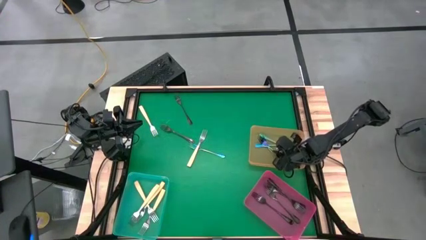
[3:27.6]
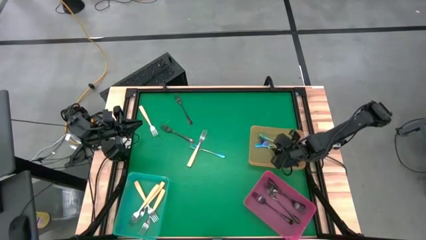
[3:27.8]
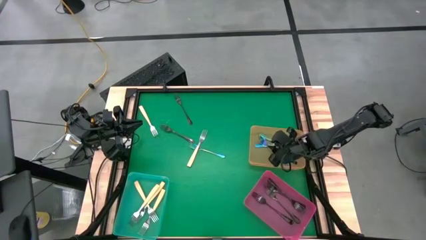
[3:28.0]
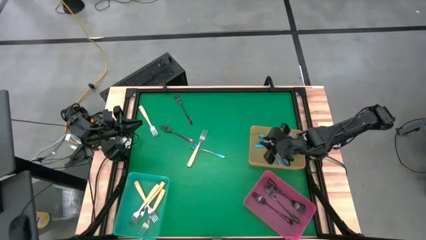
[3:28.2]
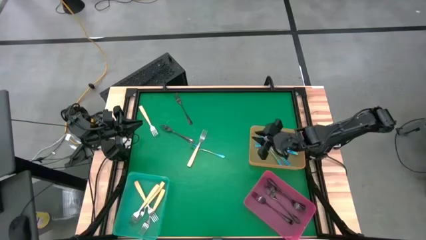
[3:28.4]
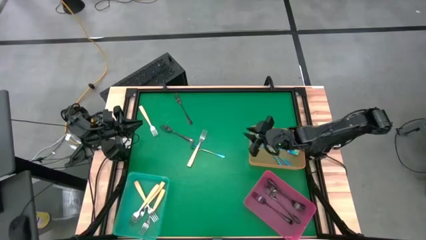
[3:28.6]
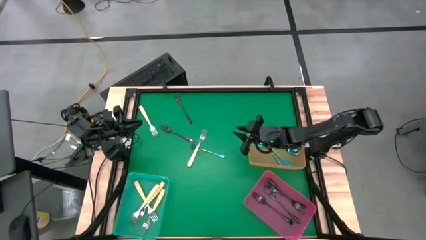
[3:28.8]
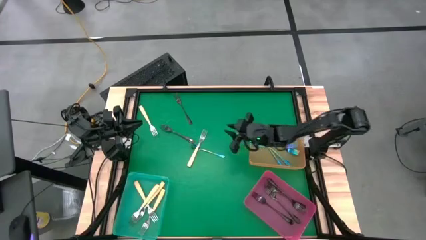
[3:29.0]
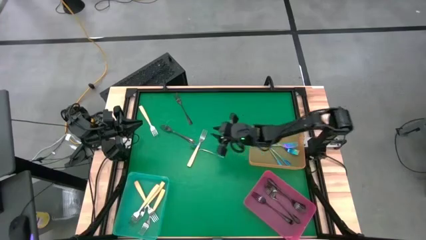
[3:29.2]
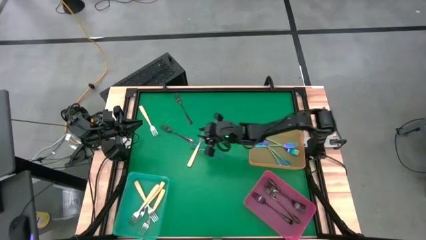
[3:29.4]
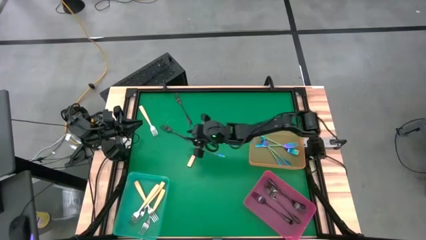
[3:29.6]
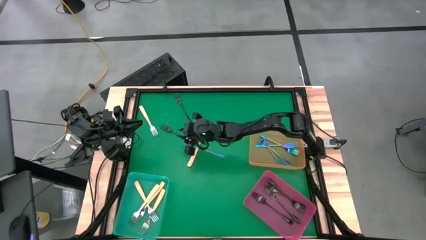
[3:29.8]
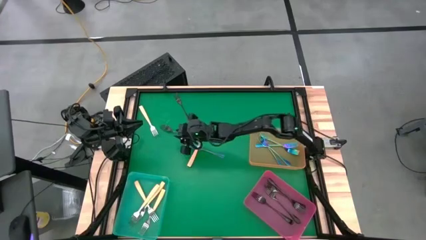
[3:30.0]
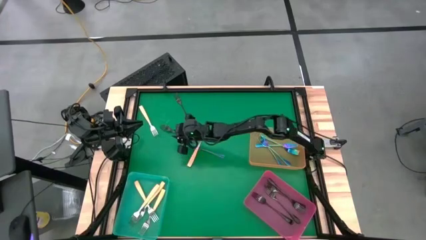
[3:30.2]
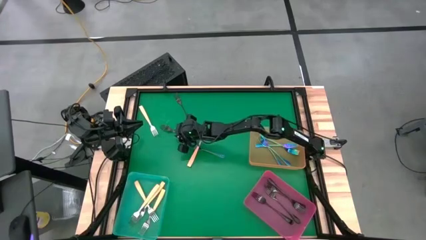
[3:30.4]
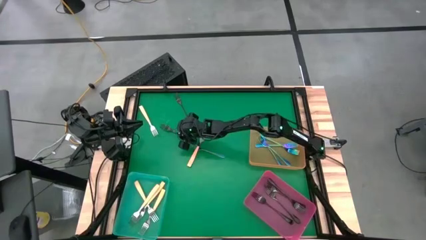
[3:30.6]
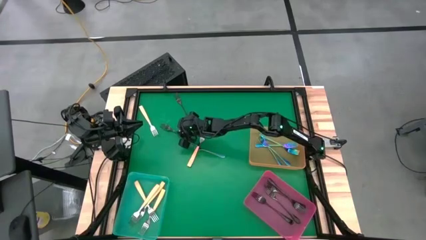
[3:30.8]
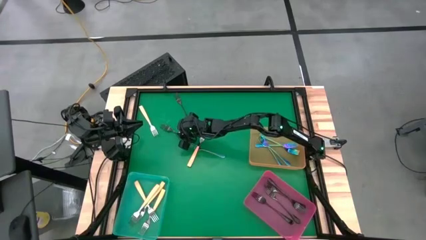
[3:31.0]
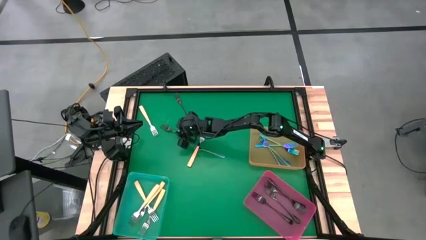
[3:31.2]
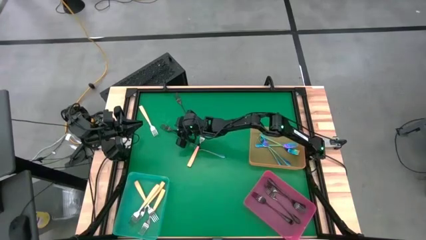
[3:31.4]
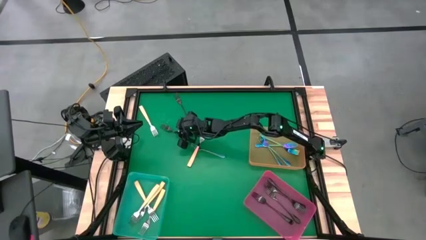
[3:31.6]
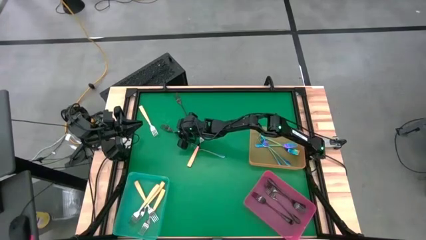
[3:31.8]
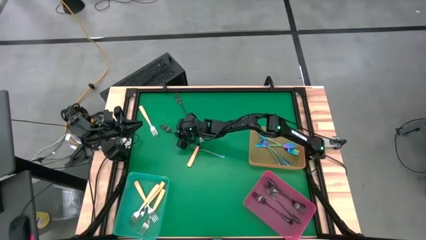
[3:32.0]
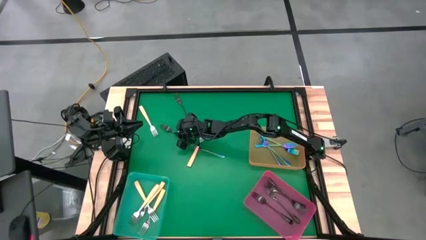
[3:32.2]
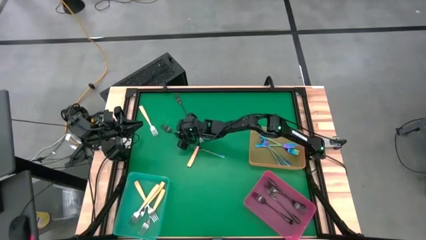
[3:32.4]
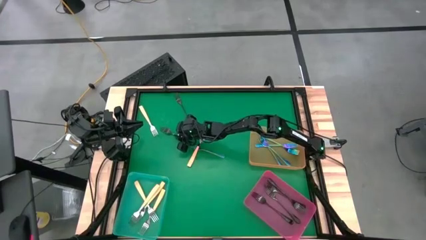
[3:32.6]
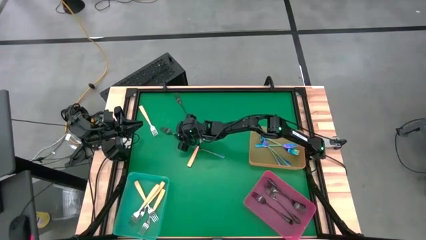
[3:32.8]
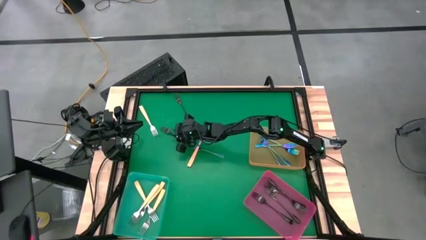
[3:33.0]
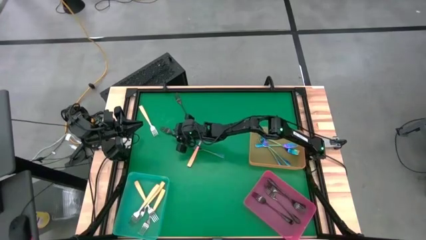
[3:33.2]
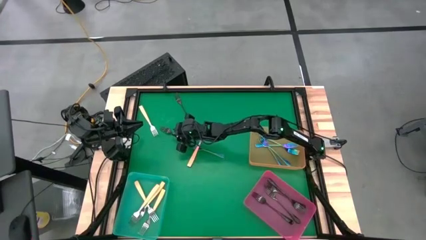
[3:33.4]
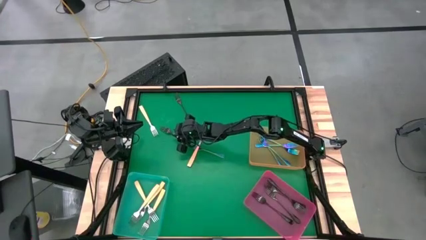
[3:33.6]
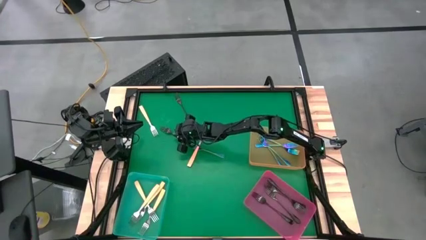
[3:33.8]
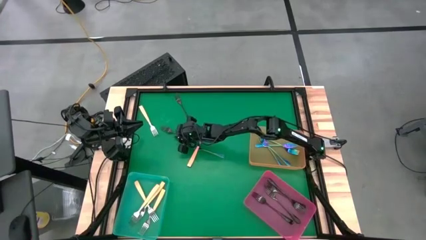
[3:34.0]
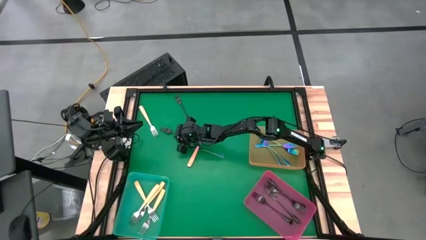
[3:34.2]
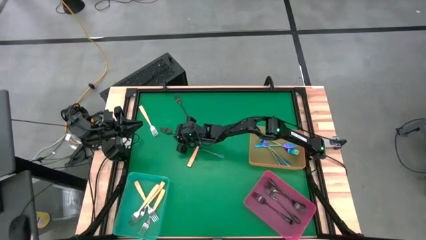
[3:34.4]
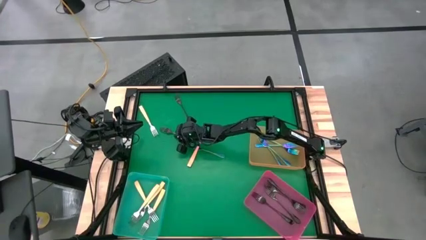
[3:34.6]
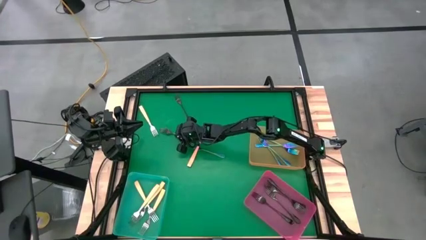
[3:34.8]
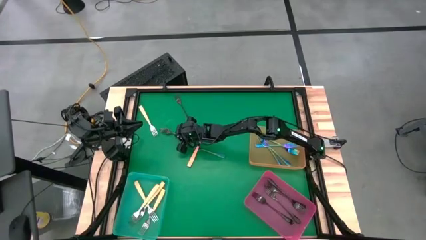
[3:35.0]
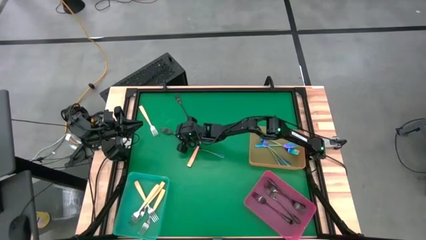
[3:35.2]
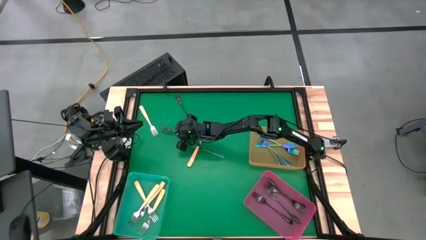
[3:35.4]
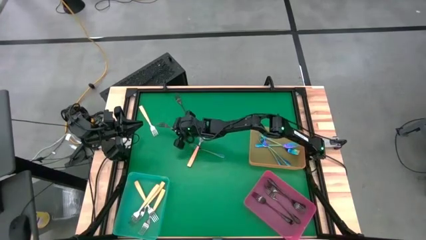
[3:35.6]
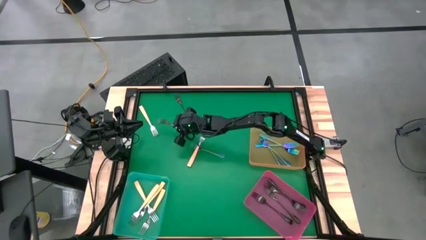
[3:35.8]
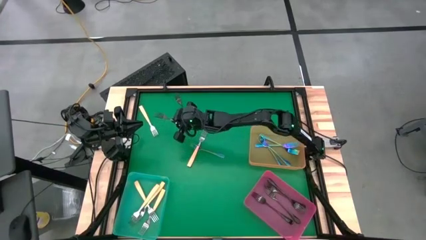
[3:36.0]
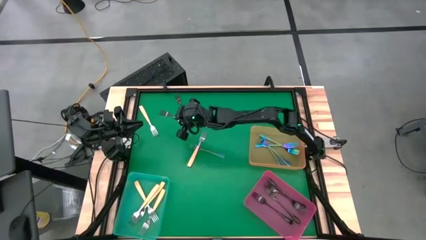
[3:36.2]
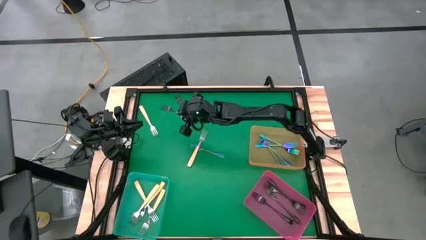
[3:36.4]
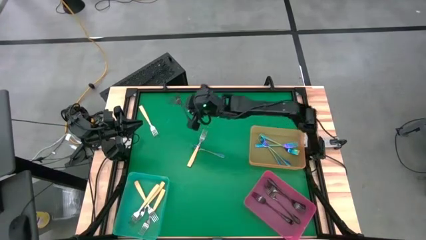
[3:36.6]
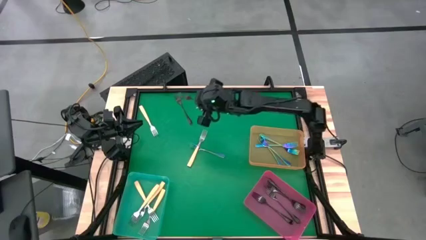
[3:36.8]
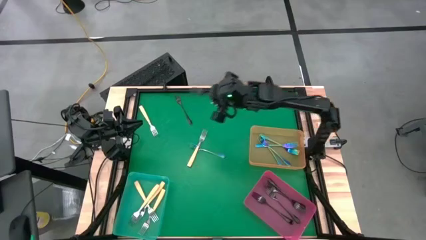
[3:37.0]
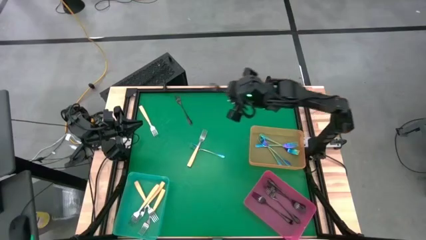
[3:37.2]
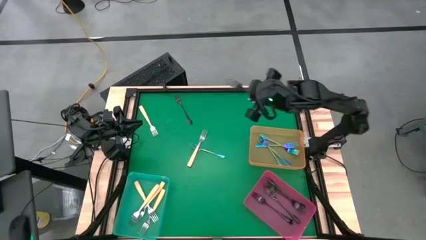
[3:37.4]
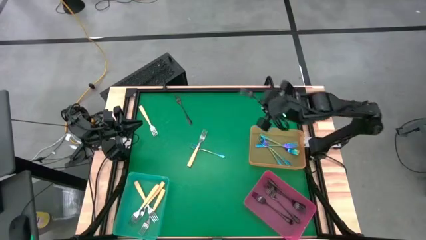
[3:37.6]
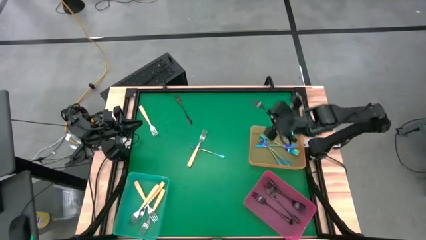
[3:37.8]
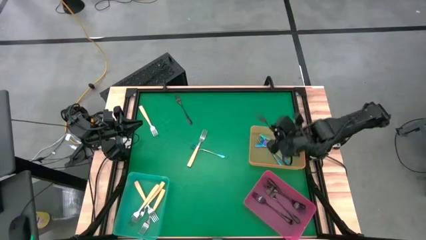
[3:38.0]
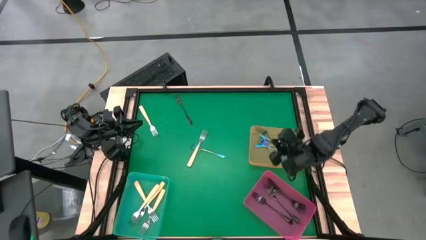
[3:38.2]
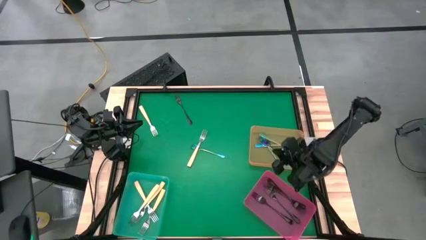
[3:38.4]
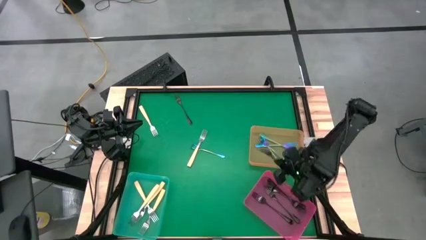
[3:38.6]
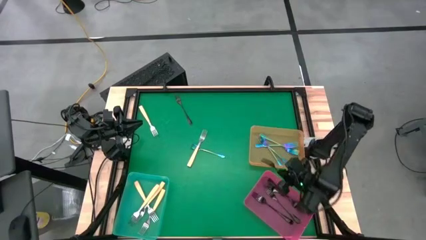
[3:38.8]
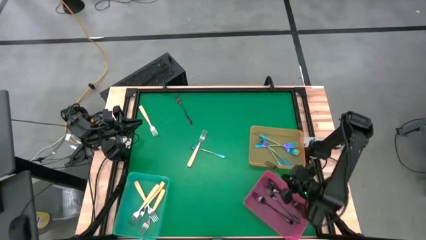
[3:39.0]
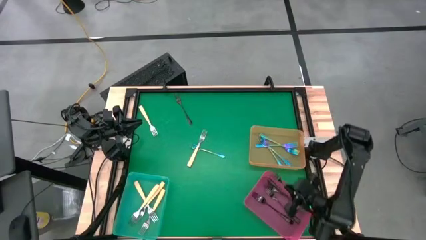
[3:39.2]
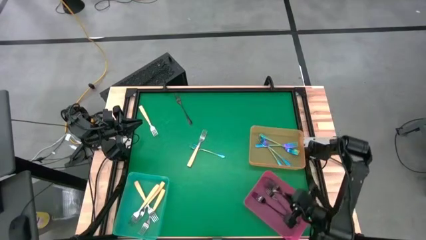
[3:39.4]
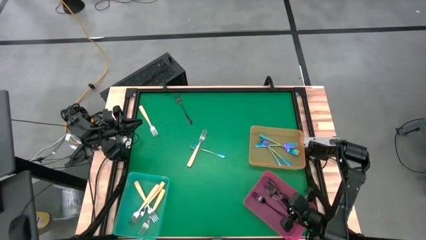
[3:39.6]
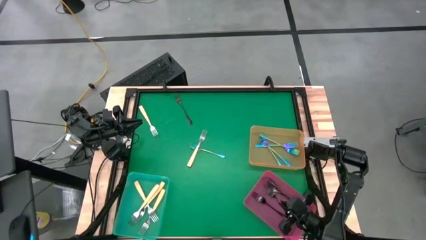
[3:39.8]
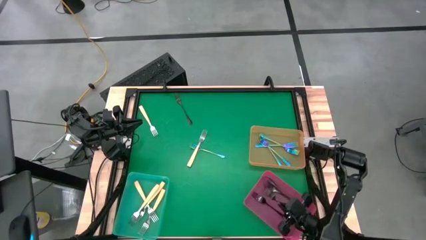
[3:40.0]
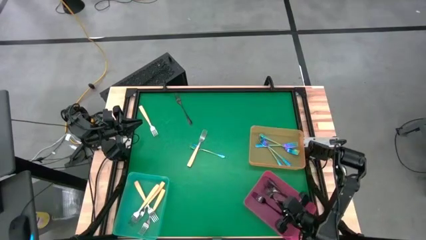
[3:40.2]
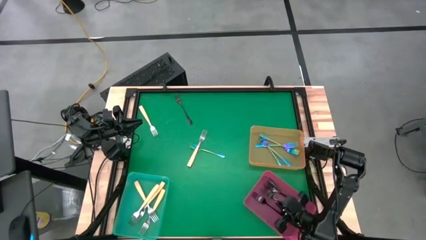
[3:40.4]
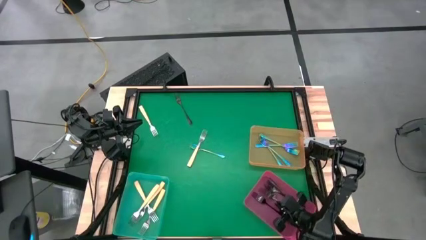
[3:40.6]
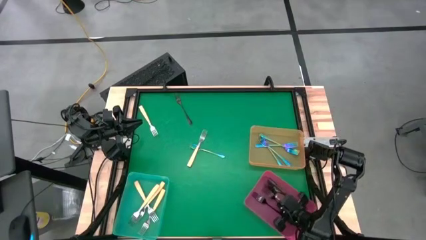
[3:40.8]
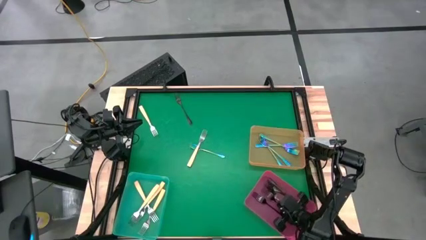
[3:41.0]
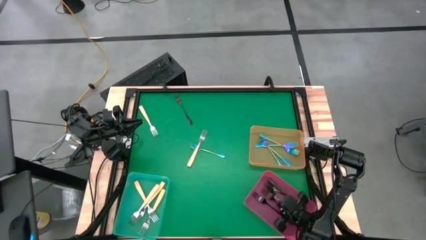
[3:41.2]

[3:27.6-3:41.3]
Task: Sort silverware by color (type)
Put the black fork into the pink bin

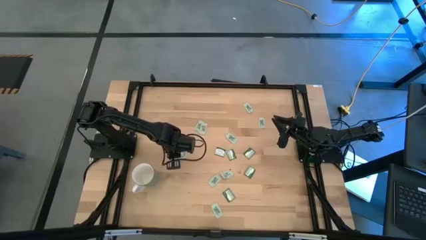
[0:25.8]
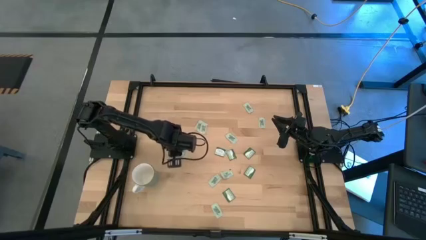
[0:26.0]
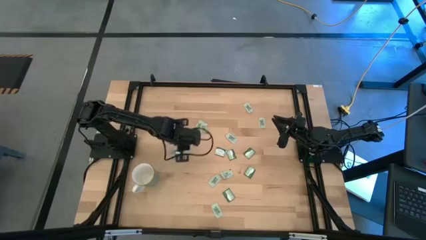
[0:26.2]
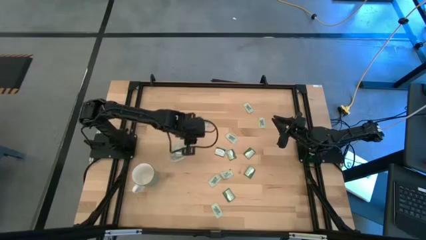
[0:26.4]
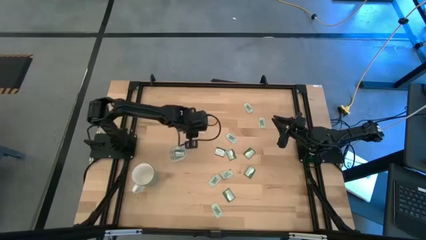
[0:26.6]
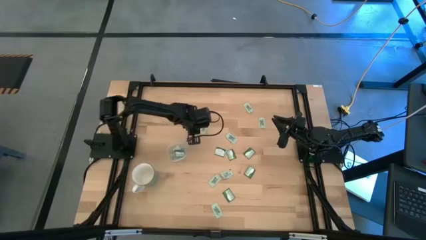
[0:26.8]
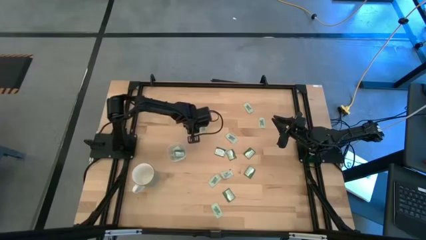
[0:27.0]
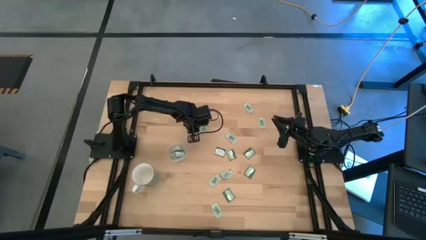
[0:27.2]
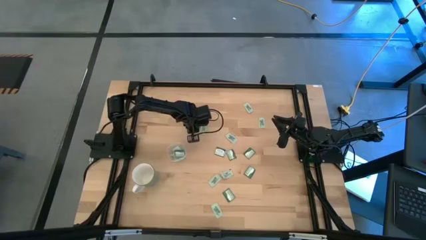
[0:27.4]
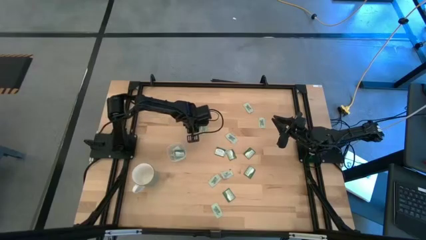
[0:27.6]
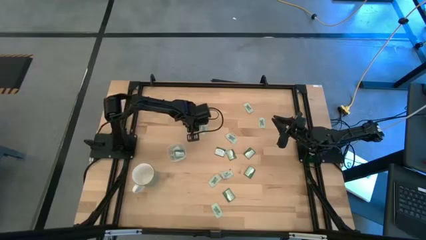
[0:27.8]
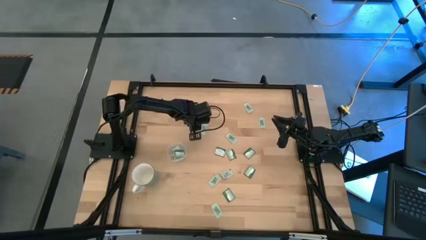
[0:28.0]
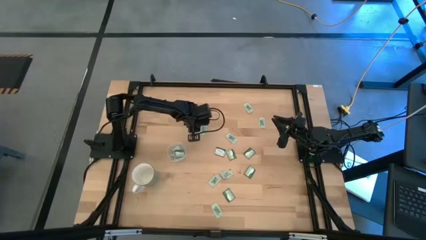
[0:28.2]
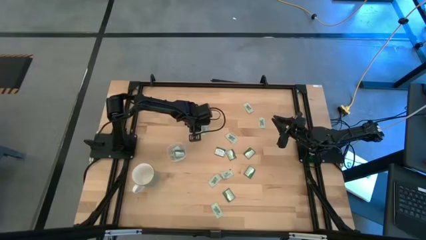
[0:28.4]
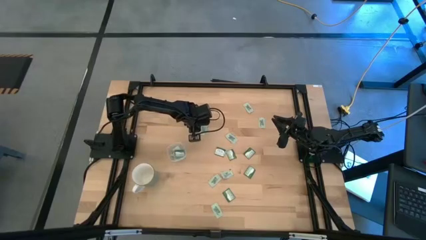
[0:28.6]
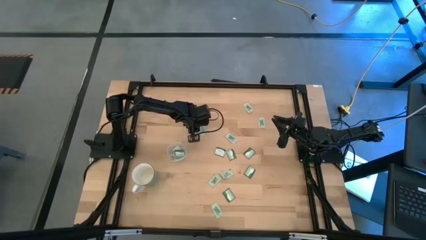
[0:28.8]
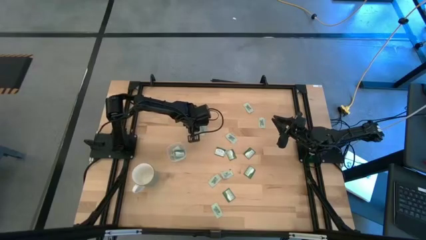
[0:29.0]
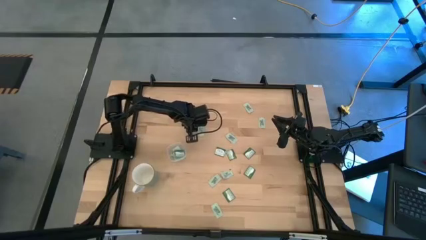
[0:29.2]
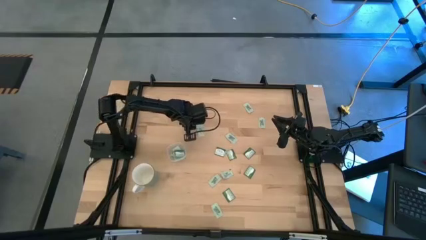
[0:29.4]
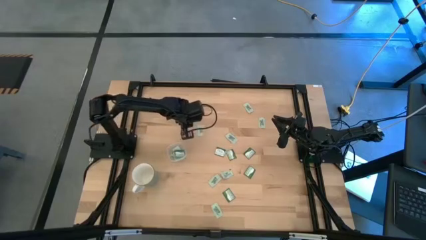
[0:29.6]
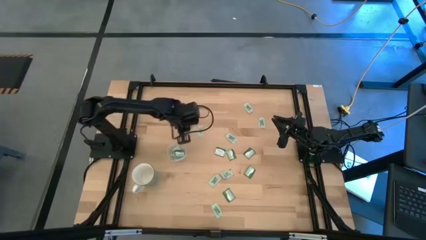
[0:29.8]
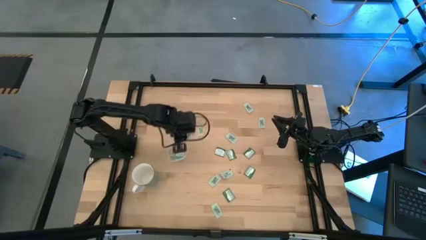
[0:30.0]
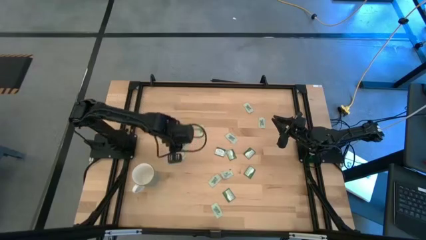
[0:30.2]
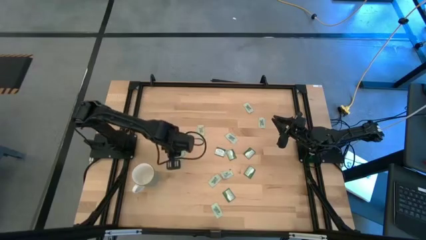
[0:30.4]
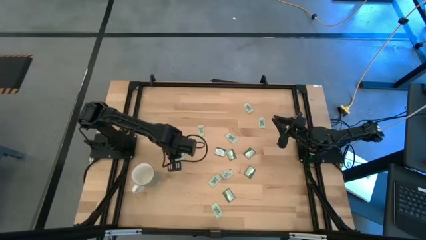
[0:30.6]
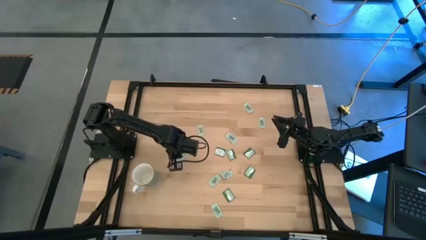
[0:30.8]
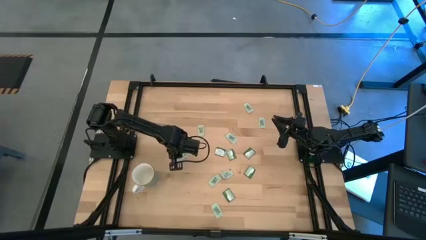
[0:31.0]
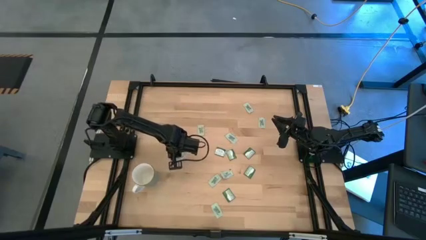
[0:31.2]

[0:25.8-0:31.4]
Task: Pick and place Stevia / Truvia into bins
Put the green stevia packet into the transparent container
